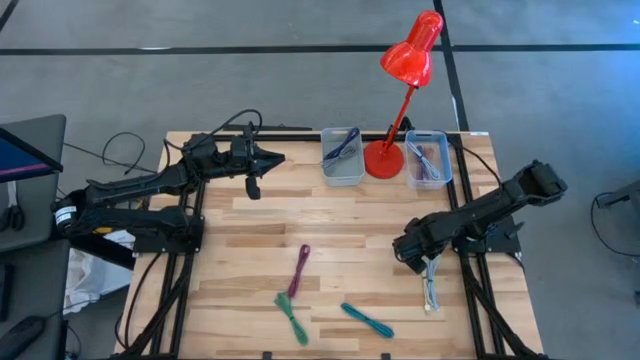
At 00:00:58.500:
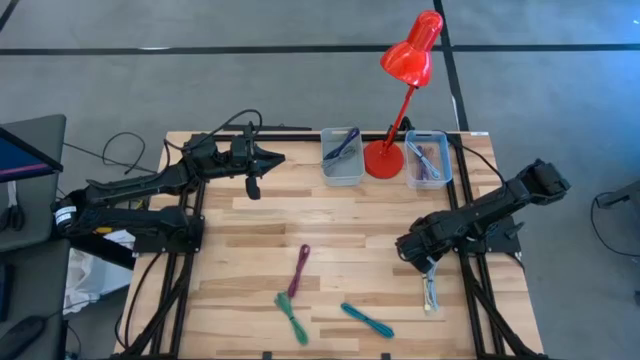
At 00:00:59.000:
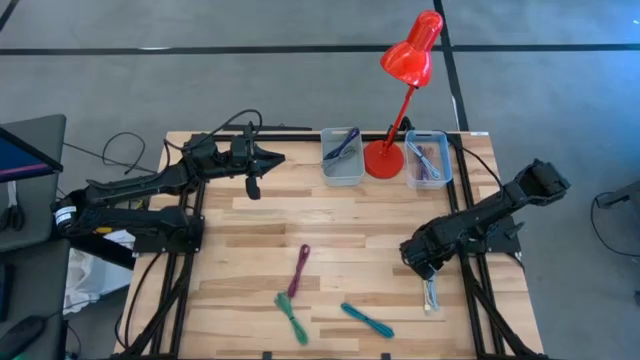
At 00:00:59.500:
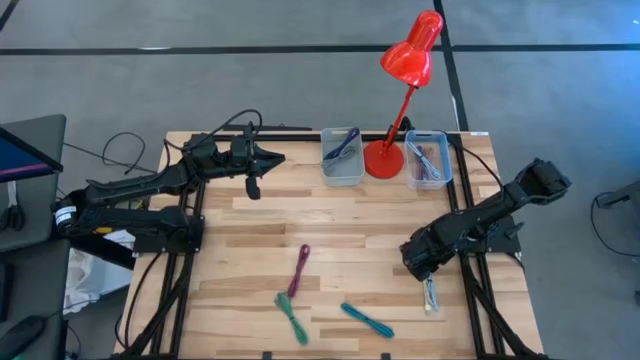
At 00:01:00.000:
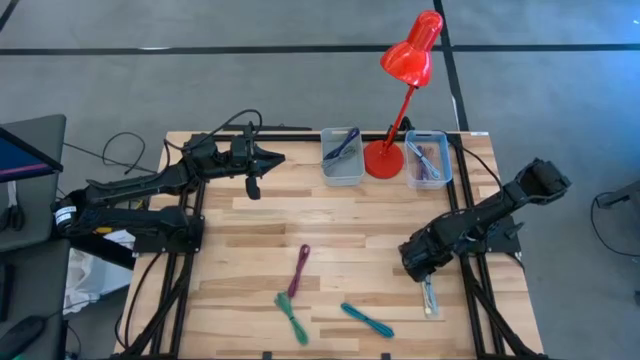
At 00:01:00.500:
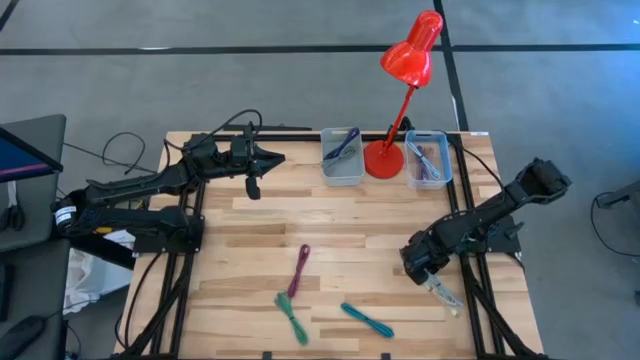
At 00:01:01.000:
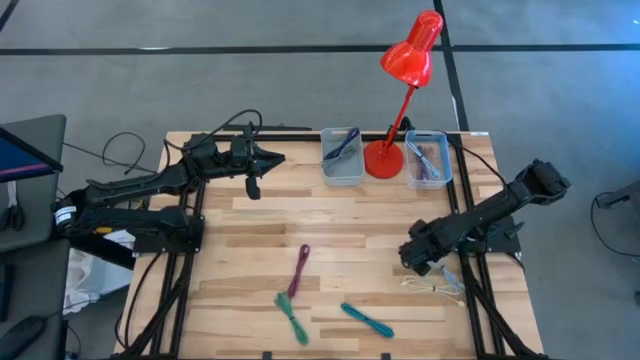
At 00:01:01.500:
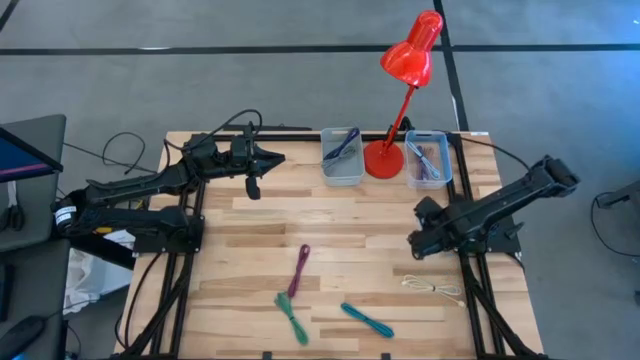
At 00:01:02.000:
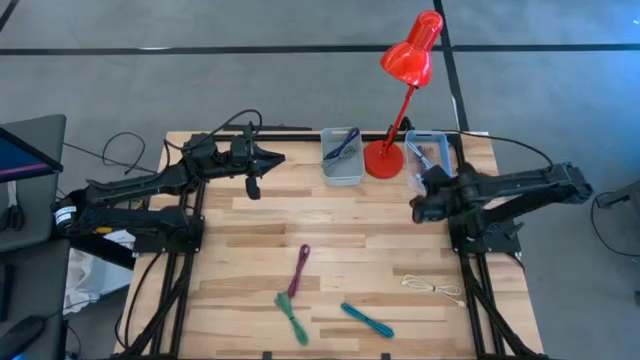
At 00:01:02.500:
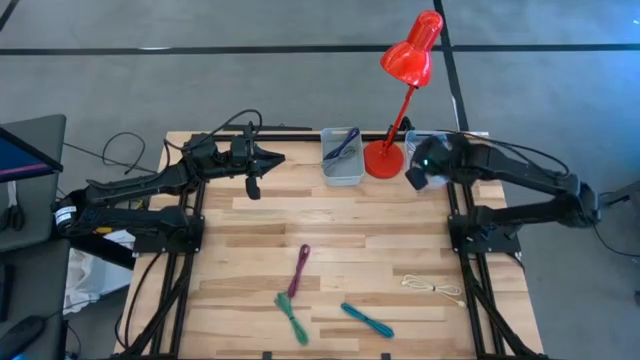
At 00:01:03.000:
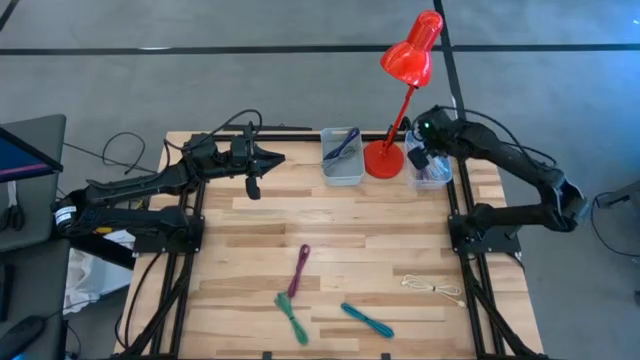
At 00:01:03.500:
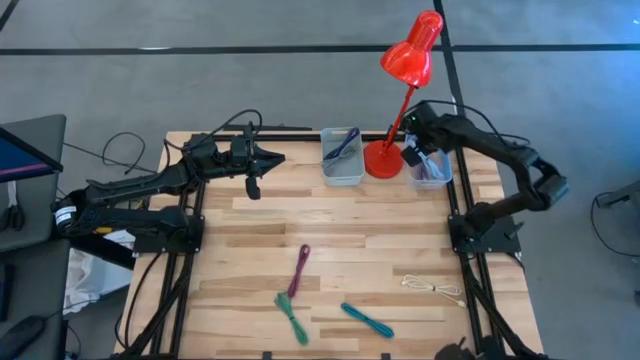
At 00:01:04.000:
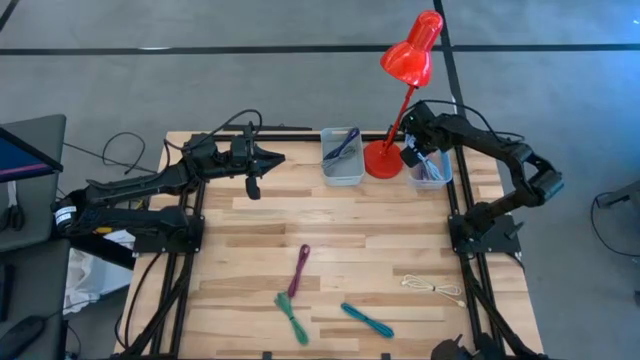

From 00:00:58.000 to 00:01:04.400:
Task: Pick & Place USB Port
Put the light blue charger cable into the transparent bin

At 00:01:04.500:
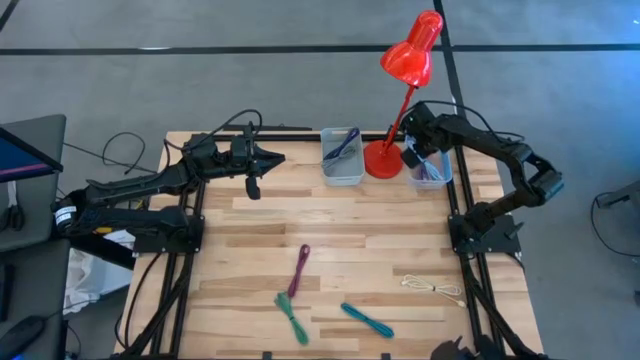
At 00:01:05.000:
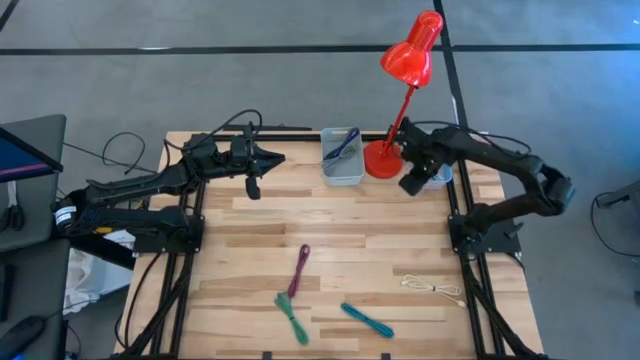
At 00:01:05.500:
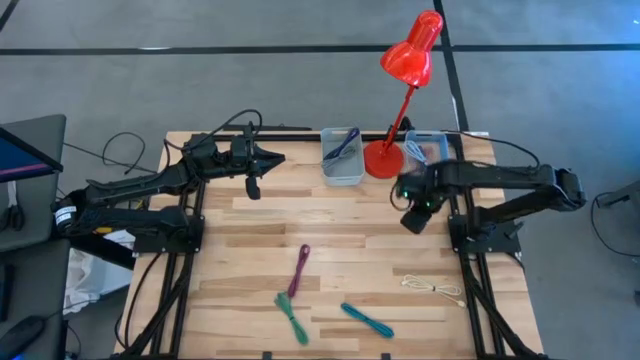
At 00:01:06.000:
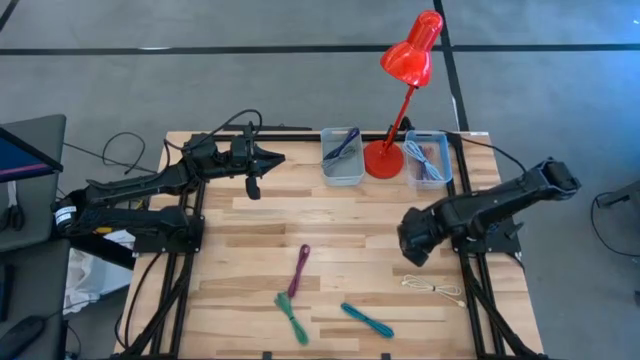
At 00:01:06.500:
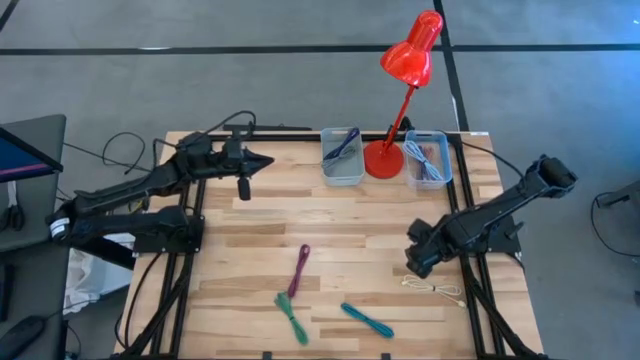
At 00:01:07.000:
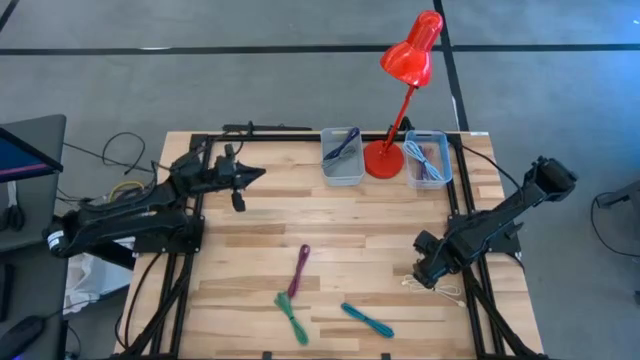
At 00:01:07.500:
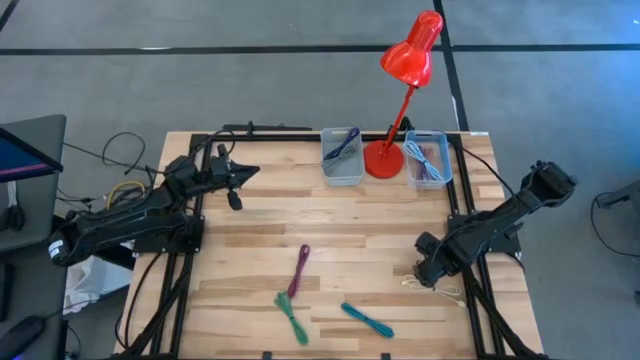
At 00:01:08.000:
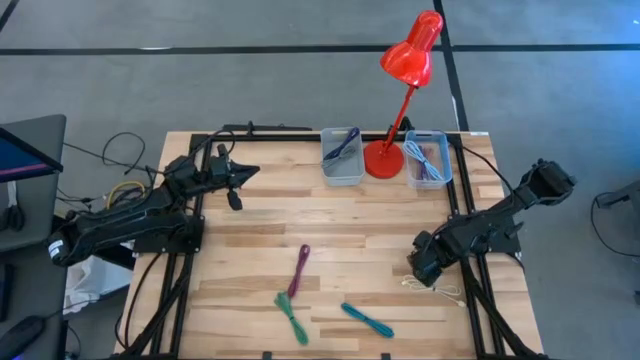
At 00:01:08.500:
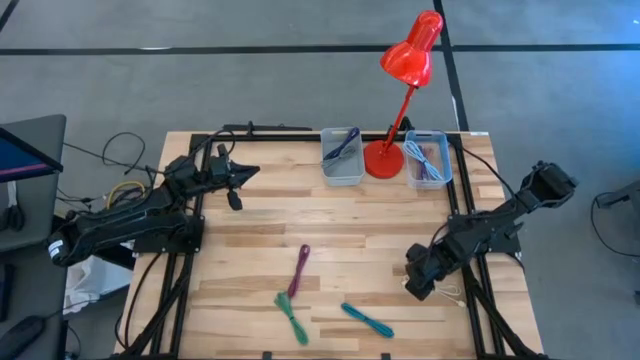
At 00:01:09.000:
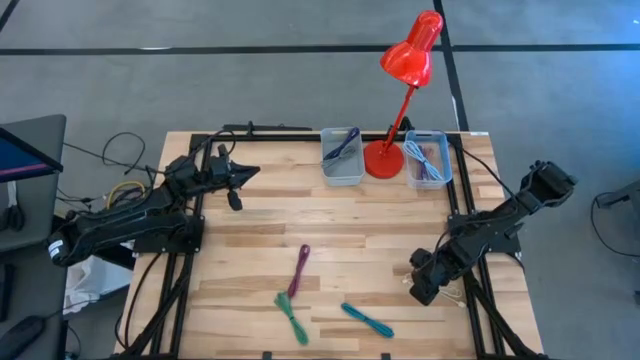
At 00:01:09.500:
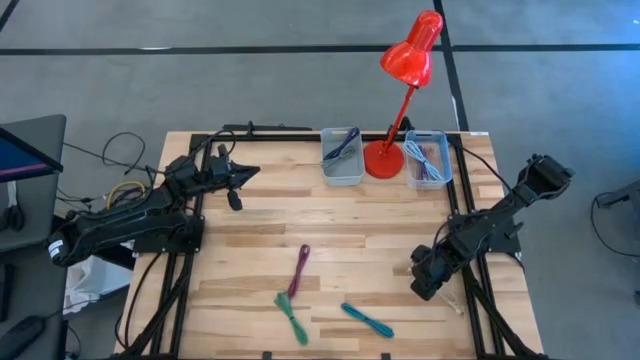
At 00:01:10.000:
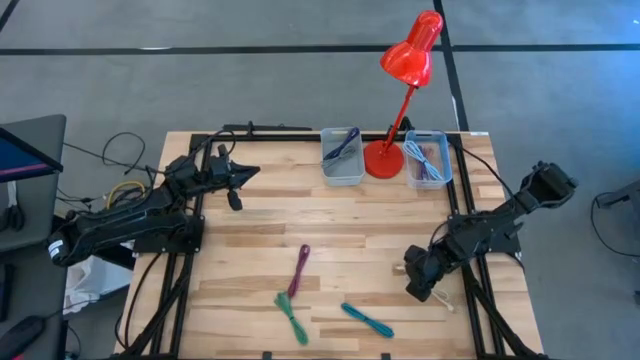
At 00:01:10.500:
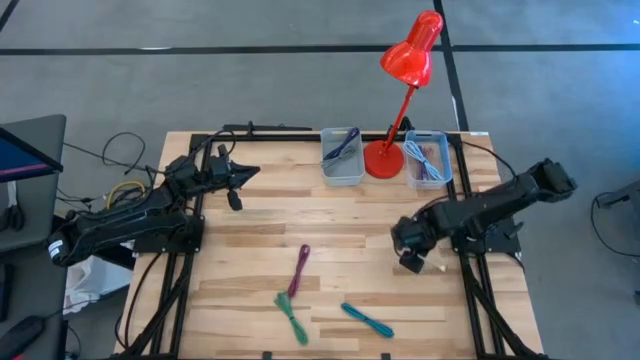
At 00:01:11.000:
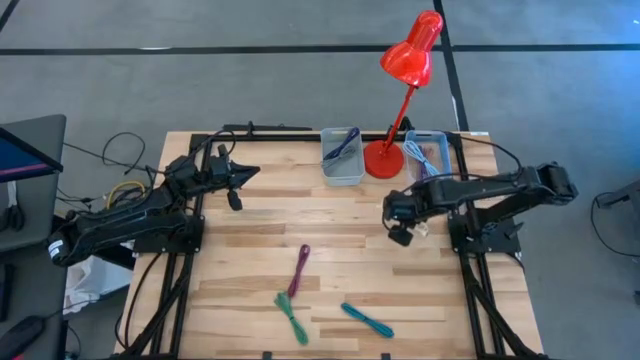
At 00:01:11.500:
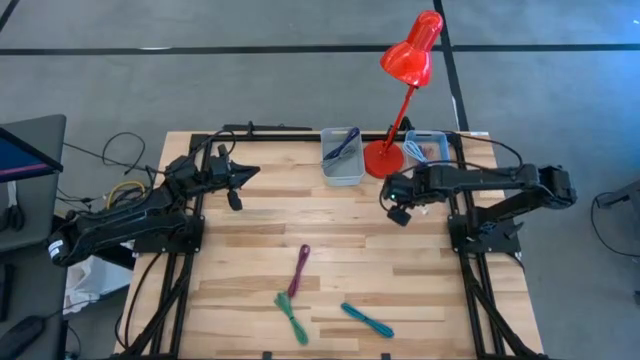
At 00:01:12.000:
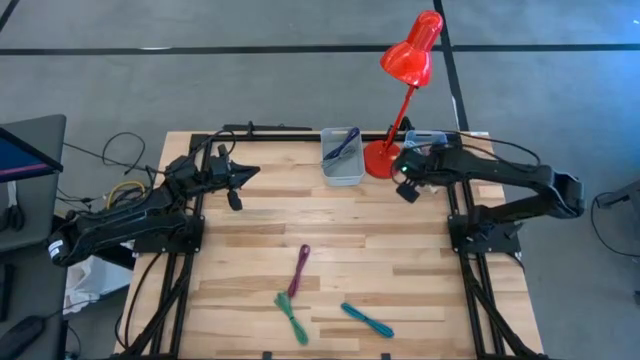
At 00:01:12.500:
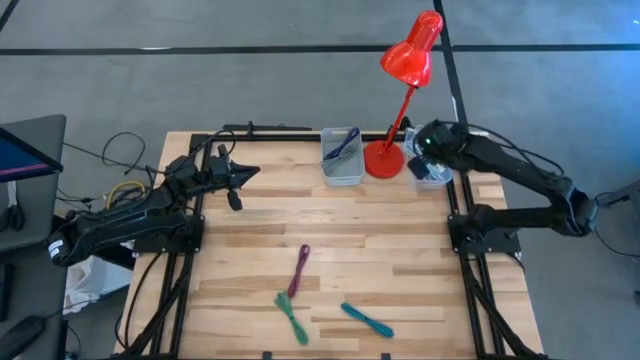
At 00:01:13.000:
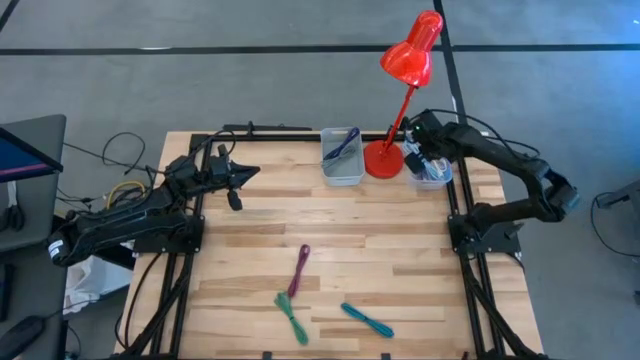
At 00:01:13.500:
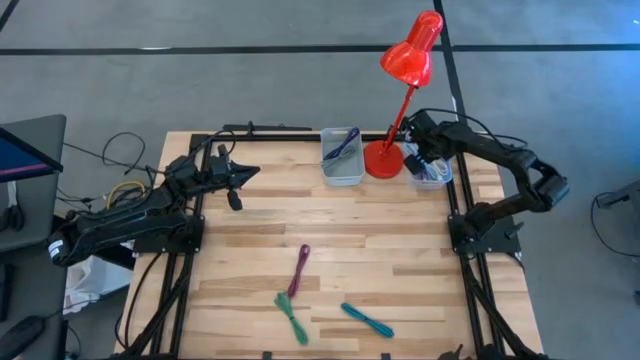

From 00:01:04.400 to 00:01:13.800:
Put the white charger cable into the transparent bin

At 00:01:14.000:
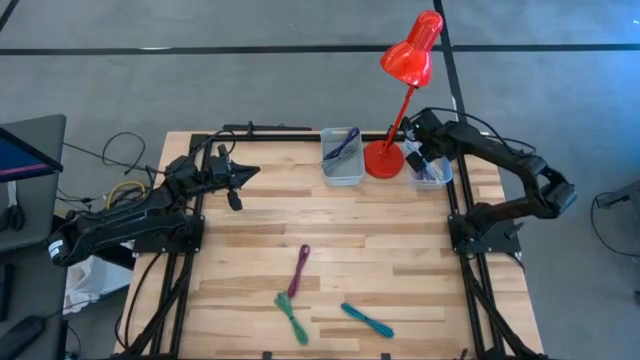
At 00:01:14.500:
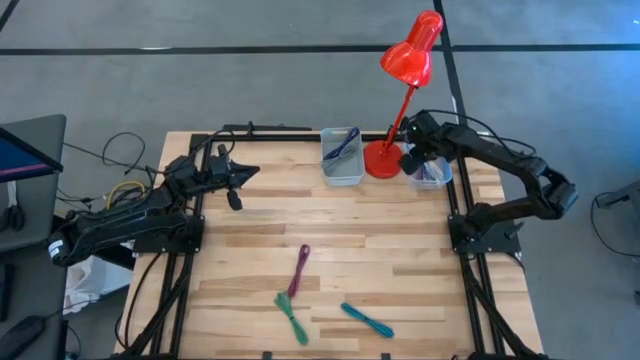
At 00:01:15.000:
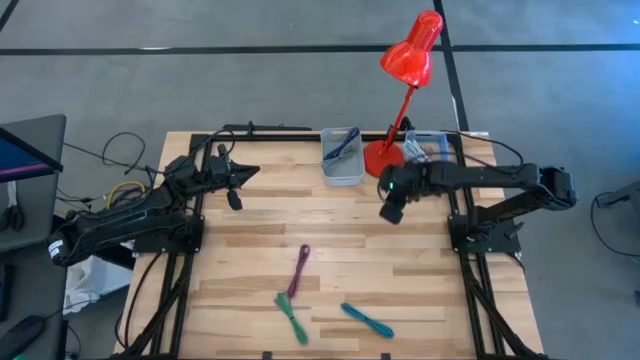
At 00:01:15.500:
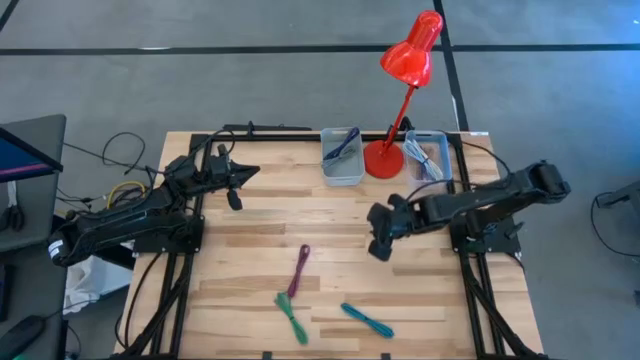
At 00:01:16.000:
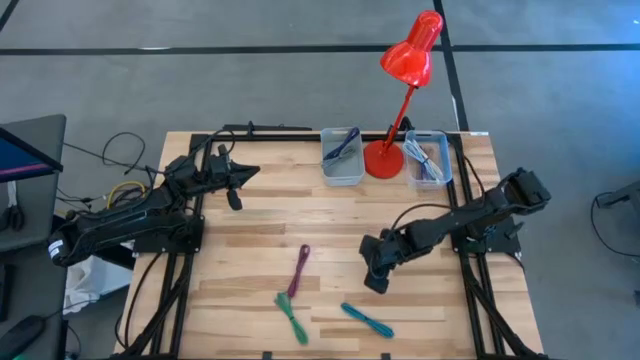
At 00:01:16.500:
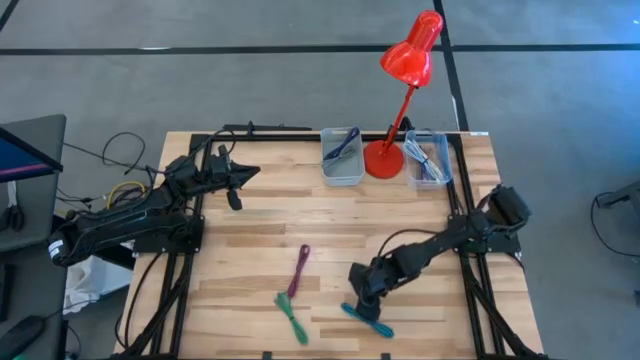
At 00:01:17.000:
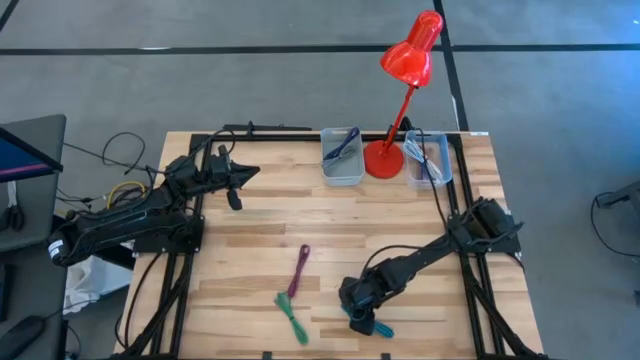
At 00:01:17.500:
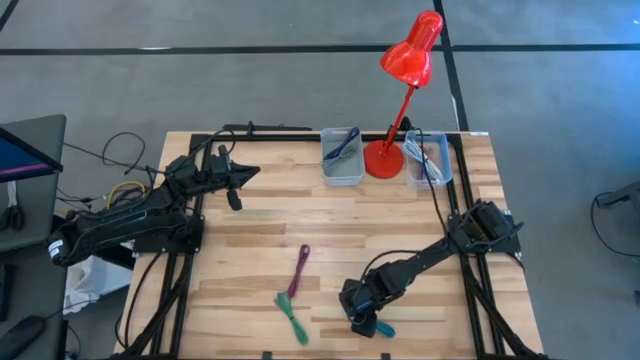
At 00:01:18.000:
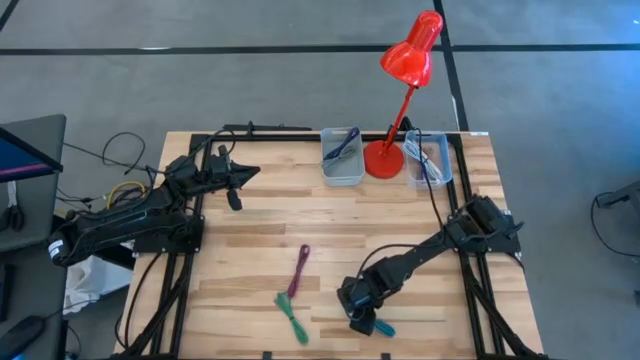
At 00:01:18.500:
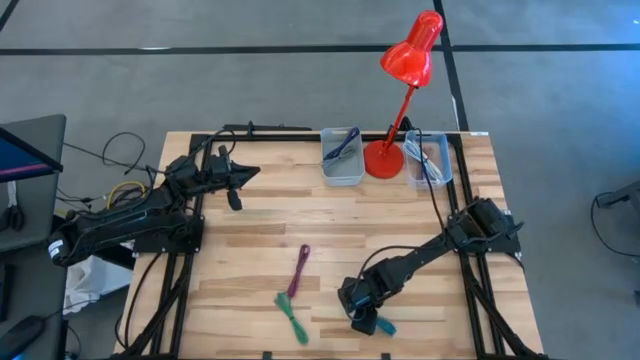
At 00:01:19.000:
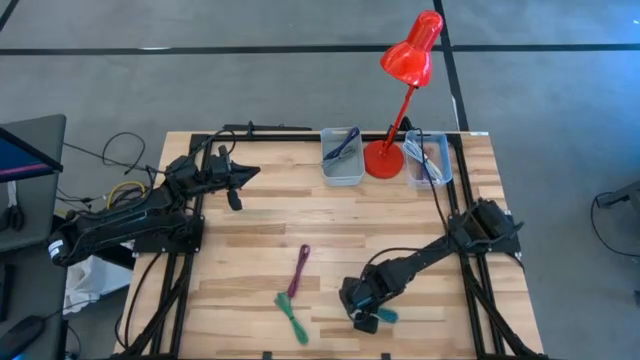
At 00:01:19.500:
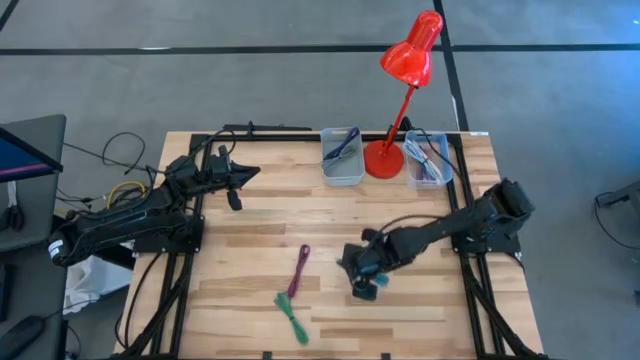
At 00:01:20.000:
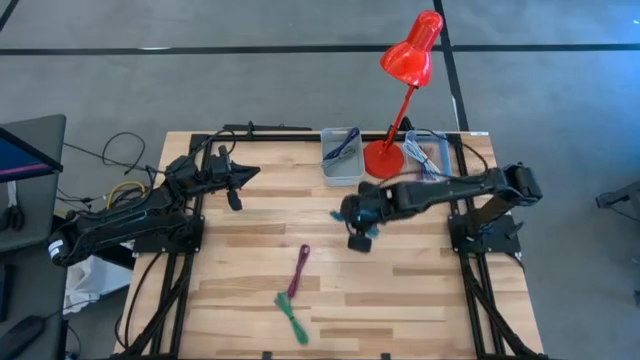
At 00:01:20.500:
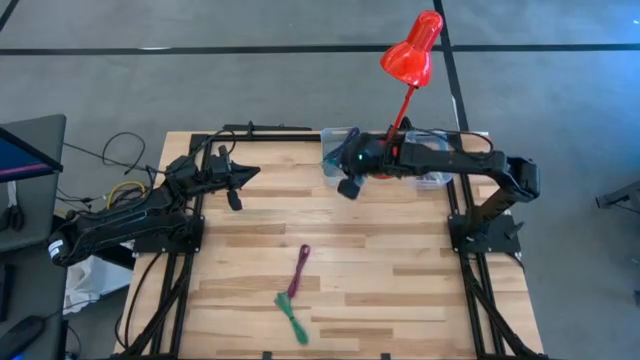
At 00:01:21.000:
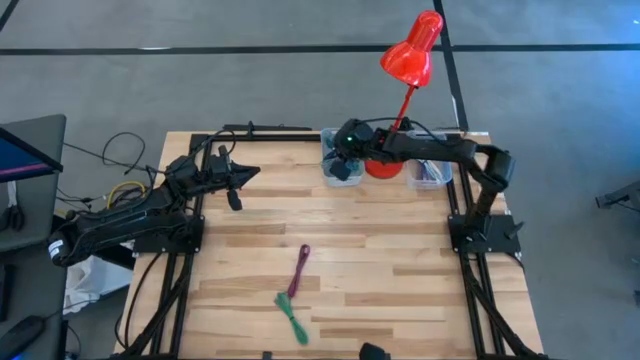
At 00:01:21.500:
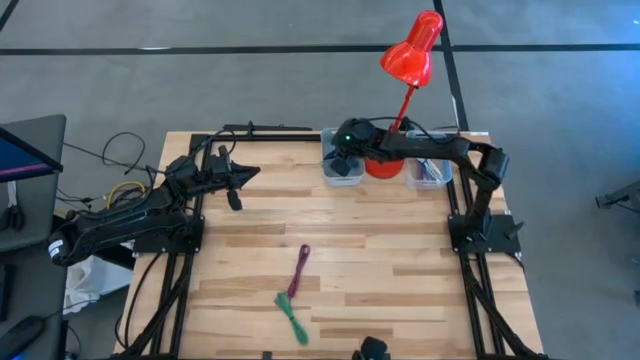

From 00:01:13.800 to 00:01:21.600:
Put the blue patterned charger cable into the white bin
